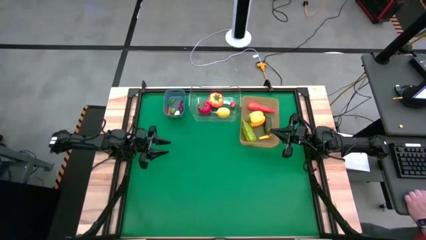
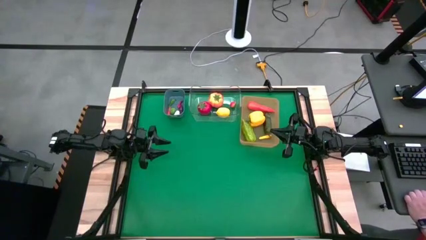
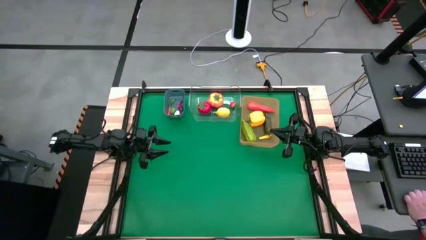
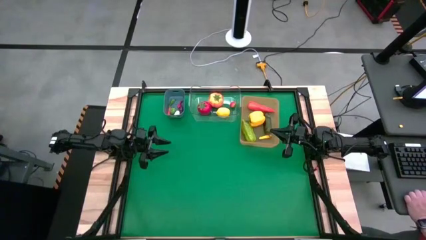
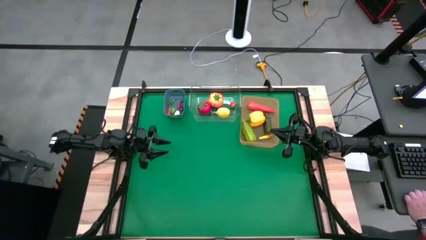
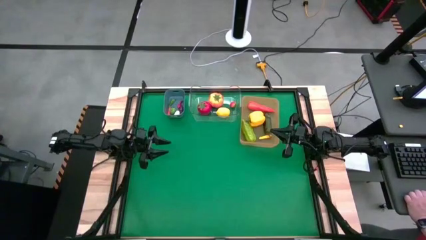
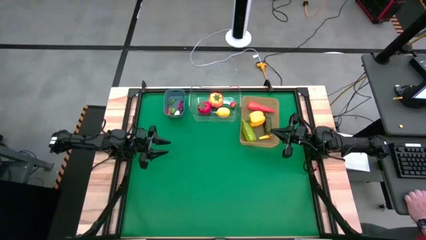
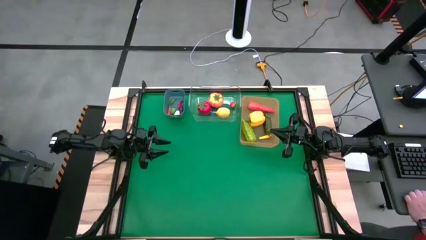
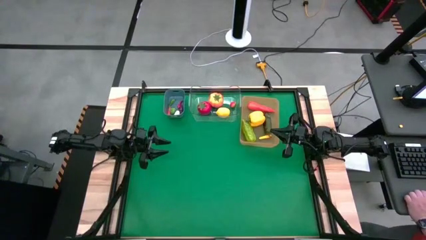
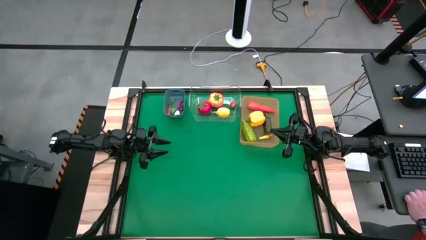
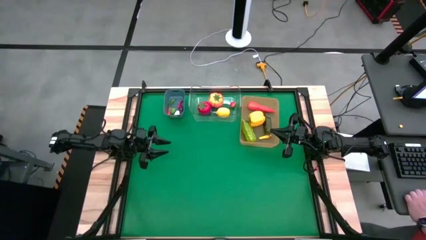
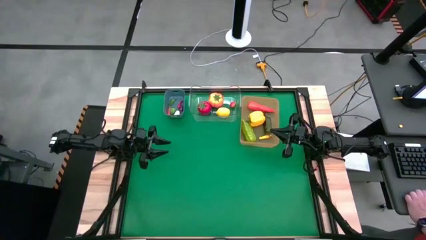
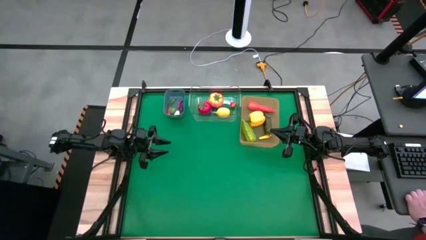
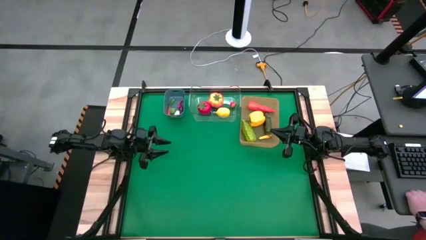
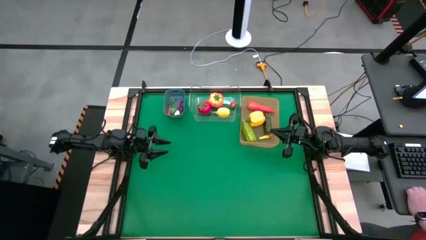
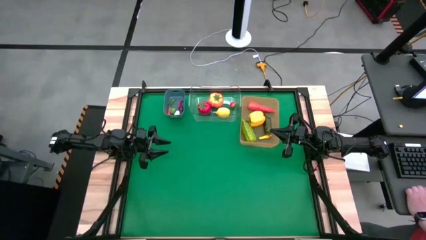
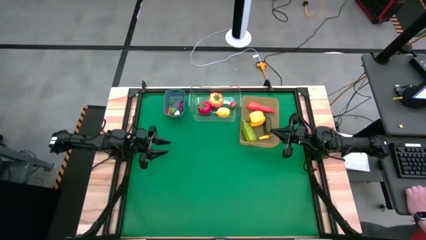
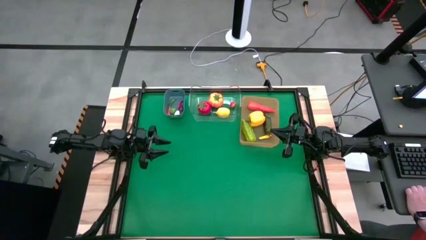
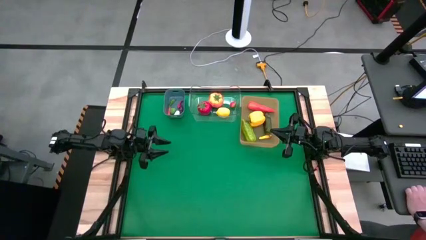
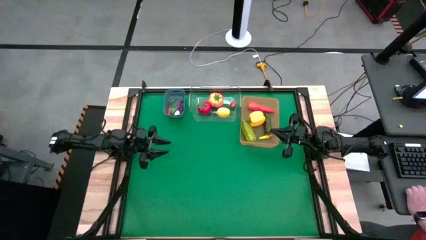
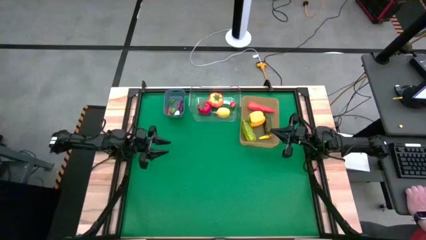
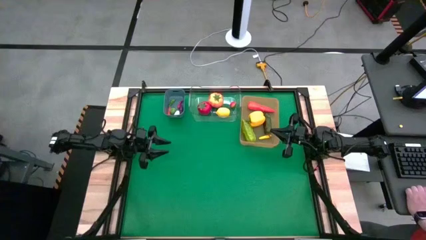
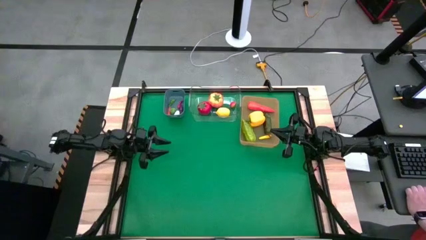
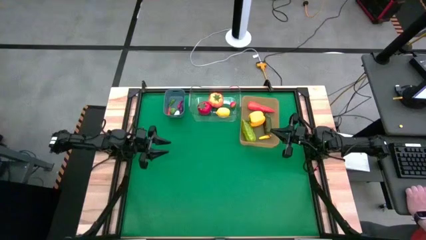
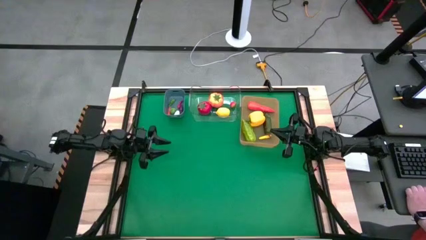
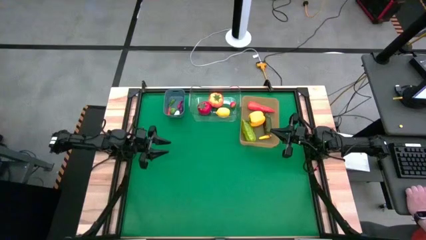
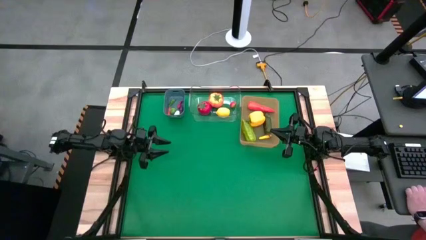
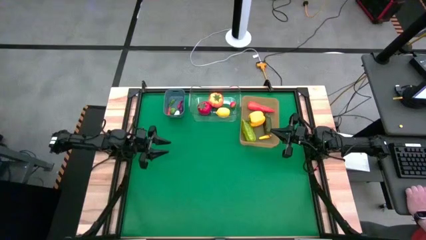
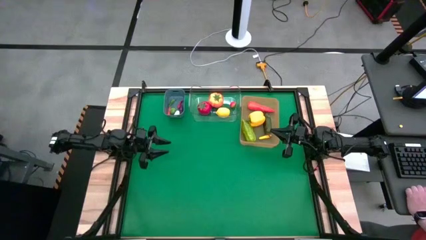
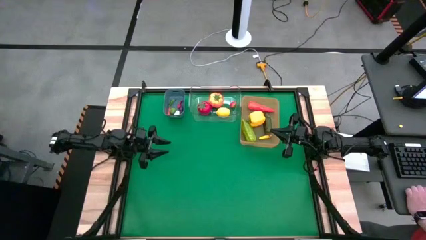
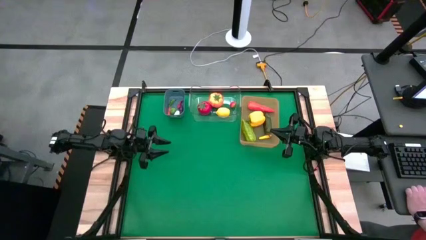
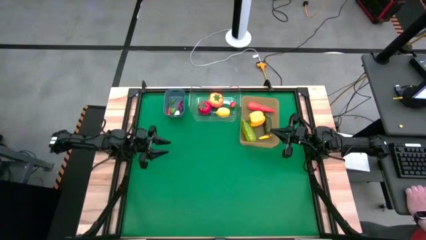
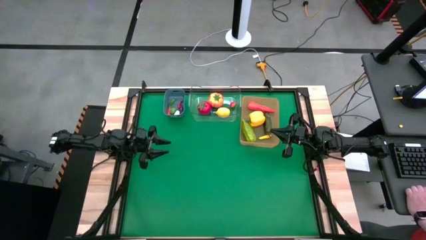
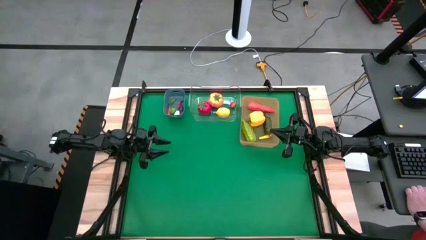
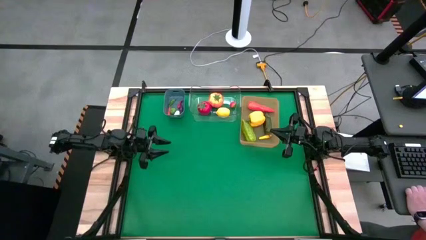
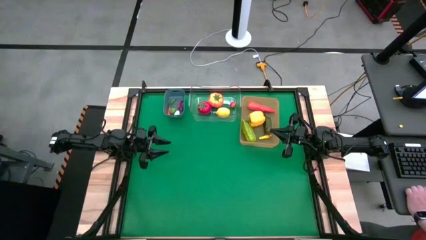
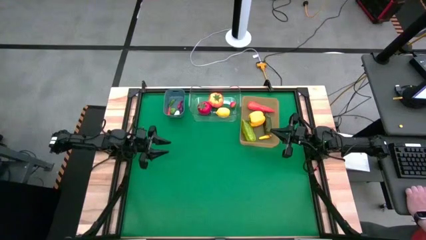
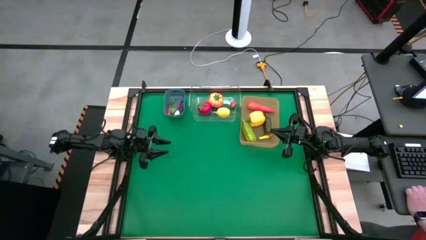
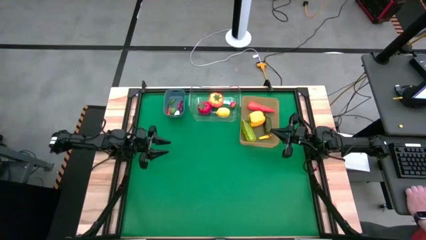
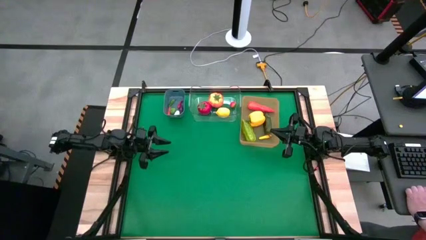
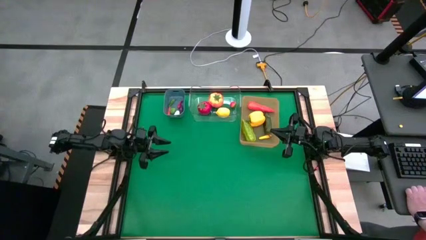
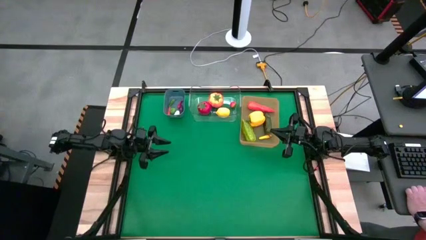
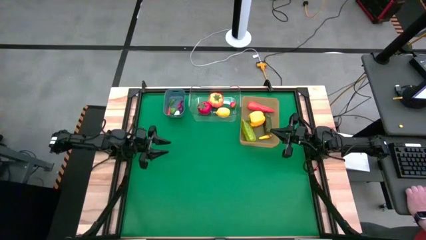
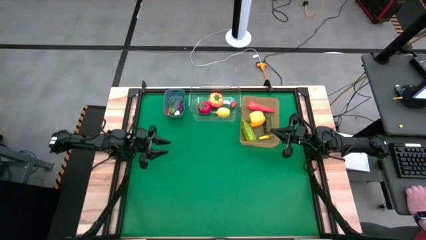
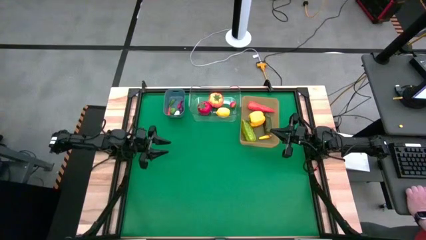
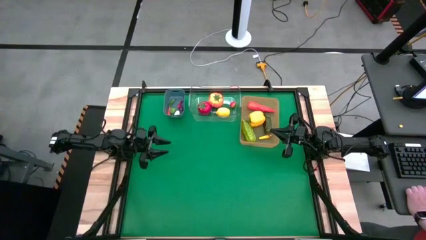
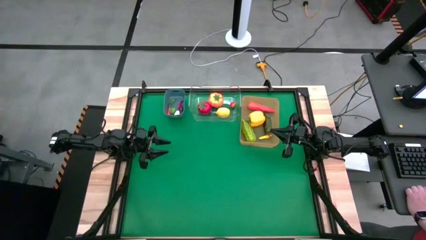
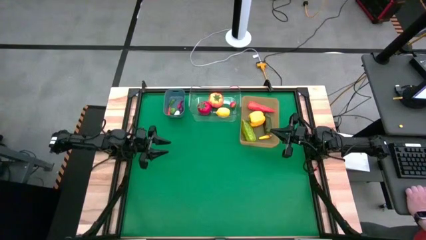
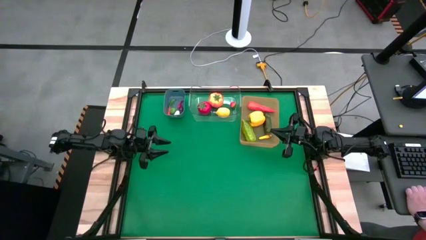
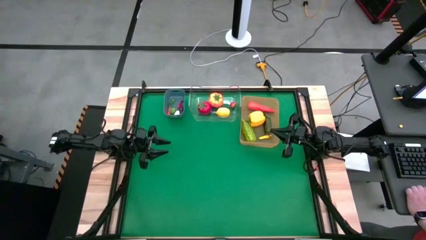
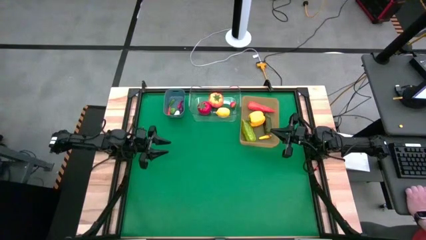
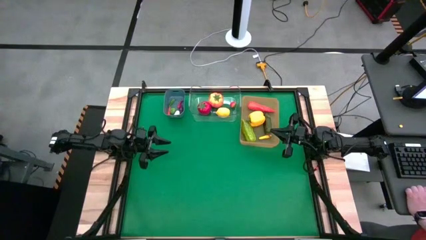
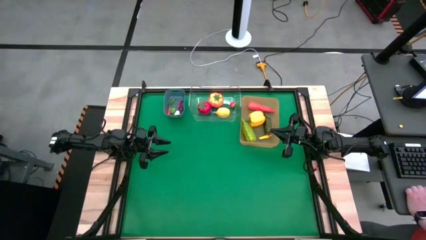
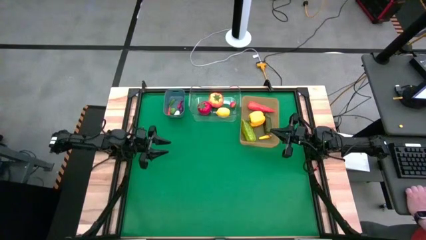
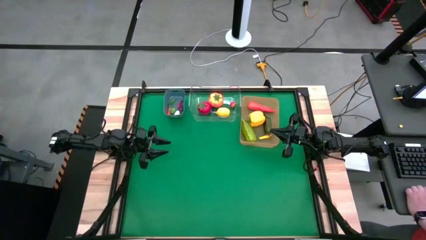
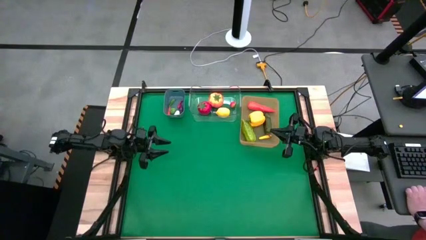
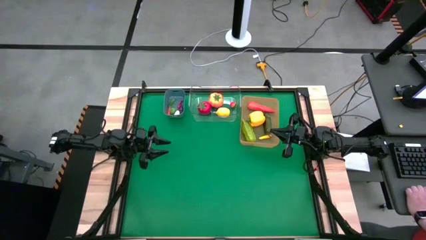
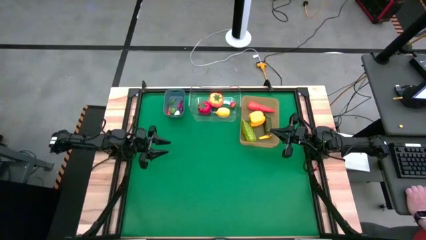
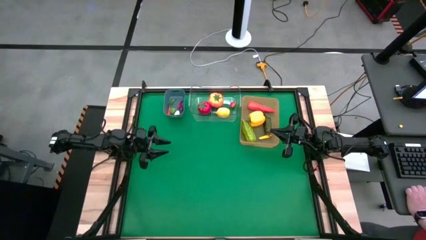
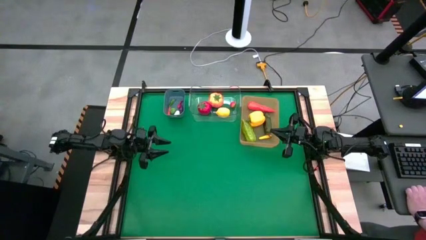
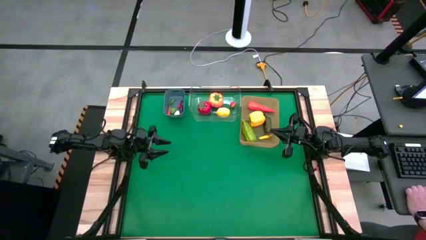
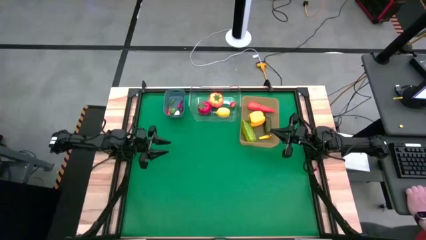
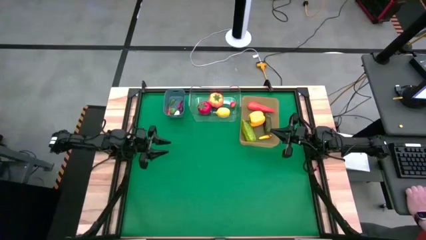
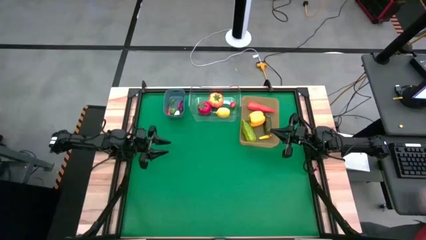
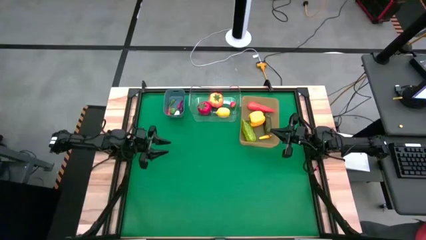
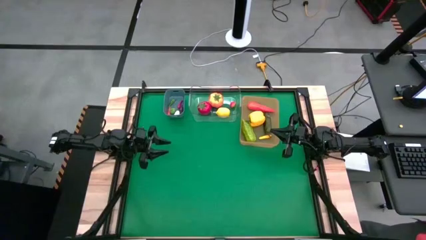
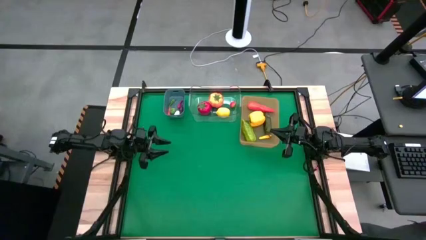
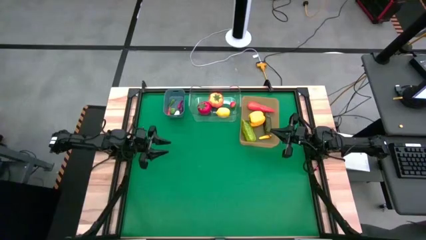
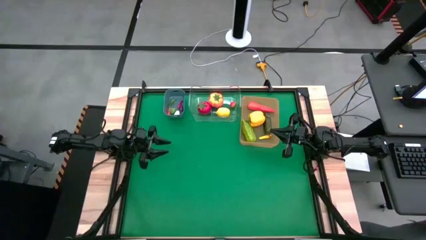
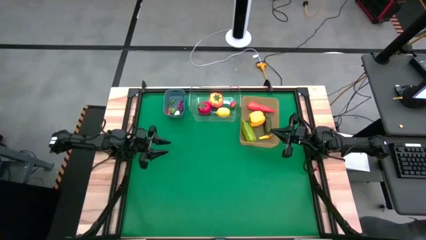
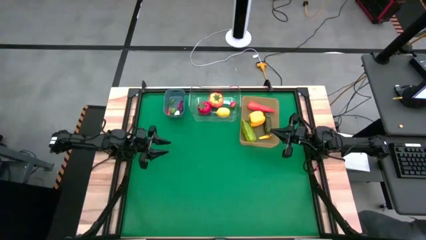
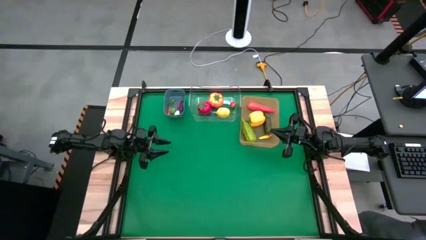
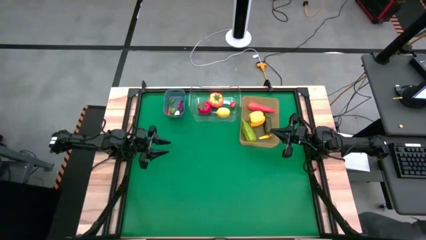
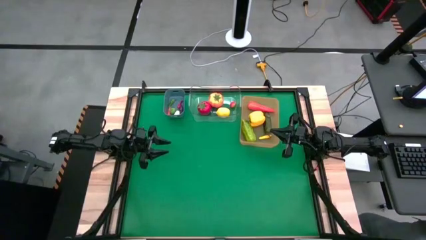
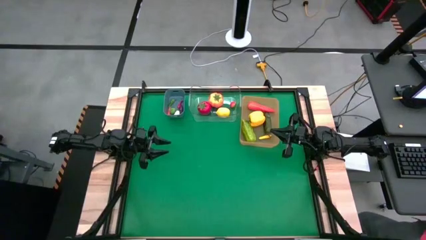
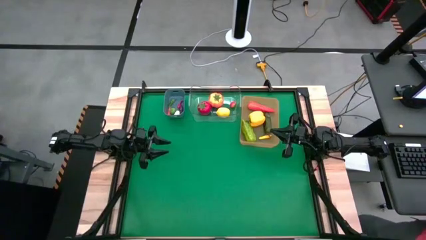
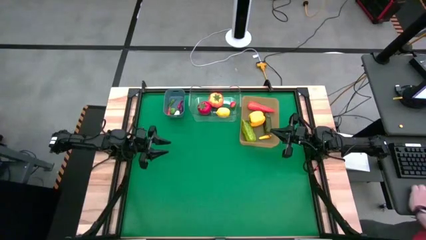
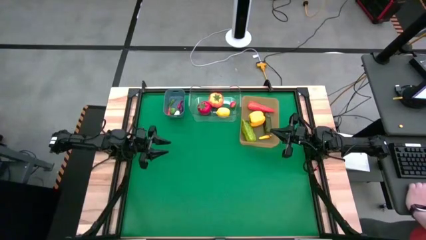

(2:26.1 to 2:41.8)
Task: Sort produce into baskets
Return to Home Position
